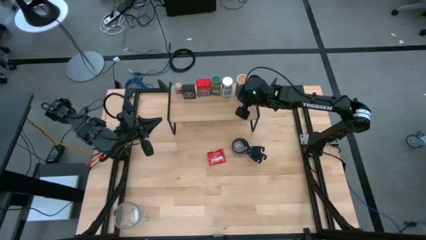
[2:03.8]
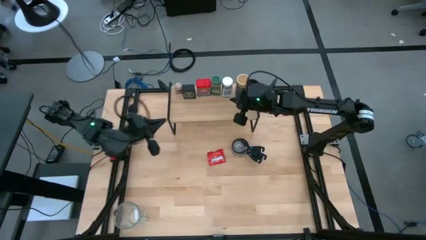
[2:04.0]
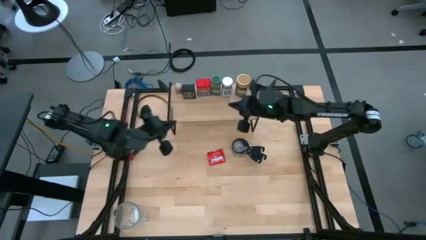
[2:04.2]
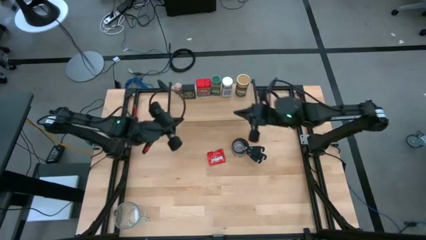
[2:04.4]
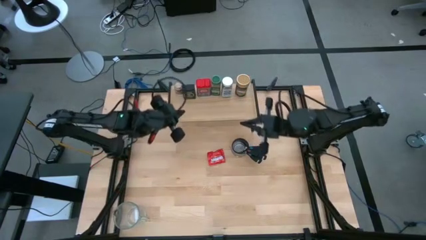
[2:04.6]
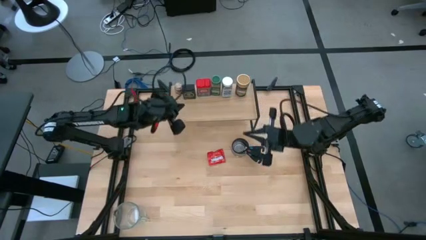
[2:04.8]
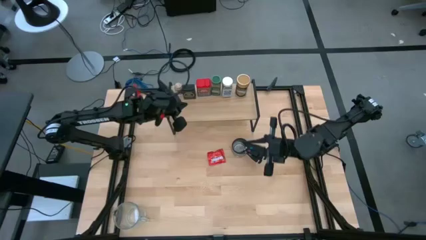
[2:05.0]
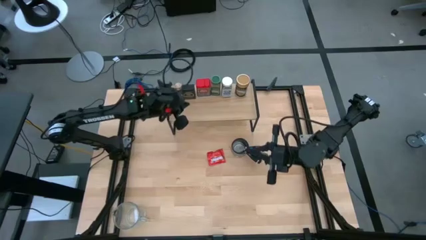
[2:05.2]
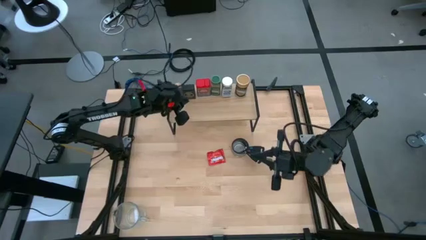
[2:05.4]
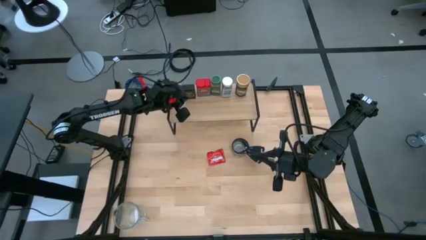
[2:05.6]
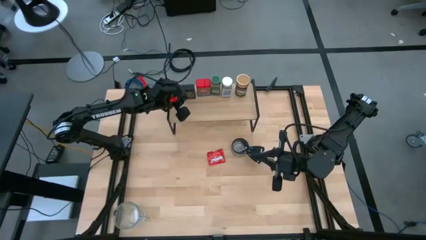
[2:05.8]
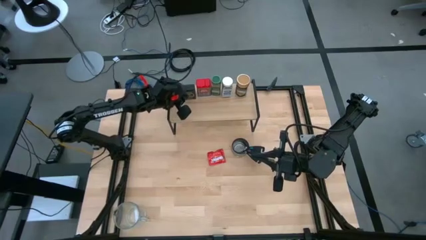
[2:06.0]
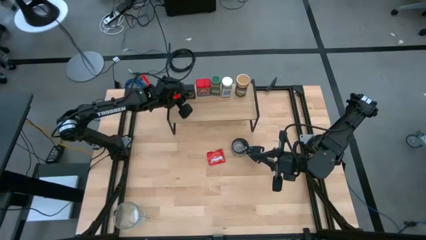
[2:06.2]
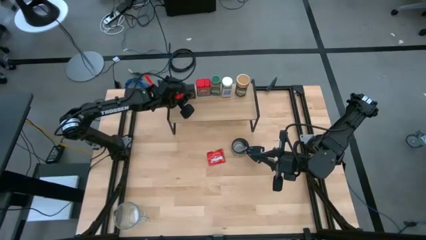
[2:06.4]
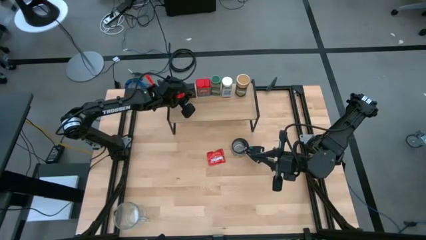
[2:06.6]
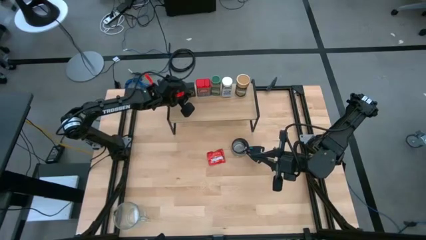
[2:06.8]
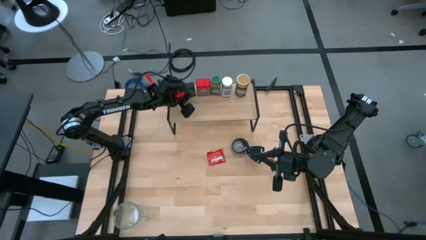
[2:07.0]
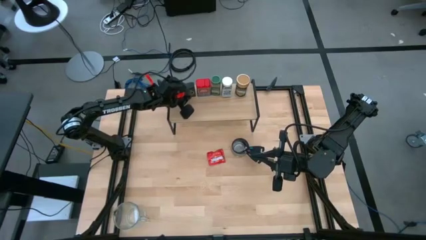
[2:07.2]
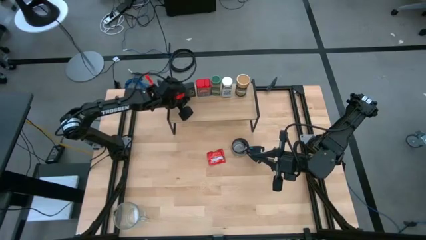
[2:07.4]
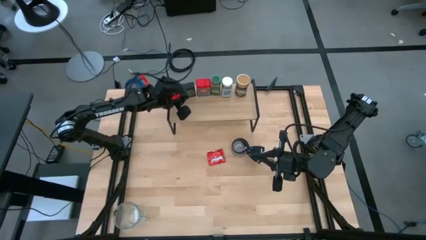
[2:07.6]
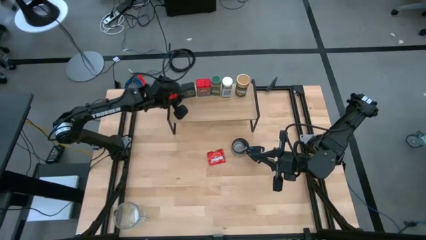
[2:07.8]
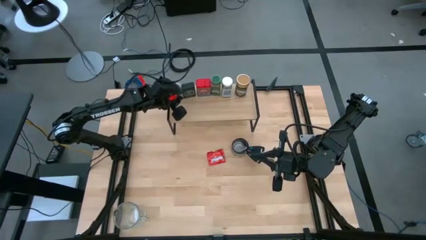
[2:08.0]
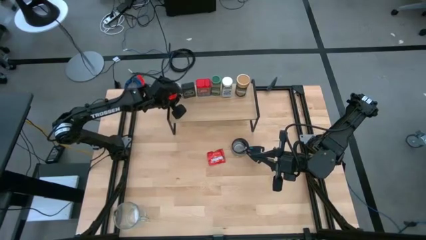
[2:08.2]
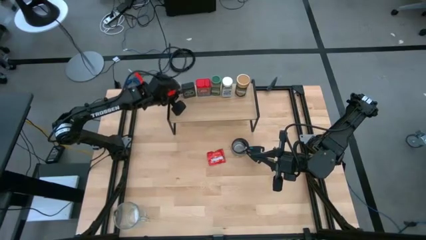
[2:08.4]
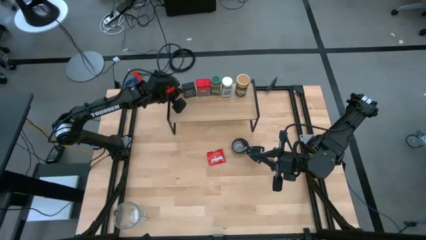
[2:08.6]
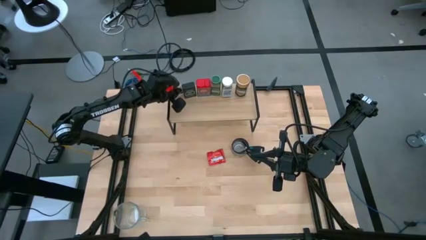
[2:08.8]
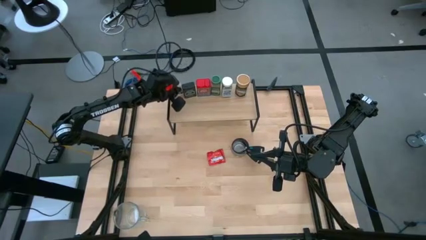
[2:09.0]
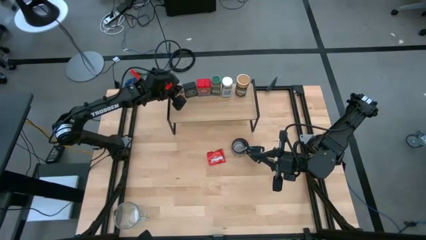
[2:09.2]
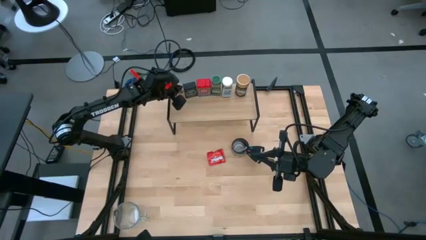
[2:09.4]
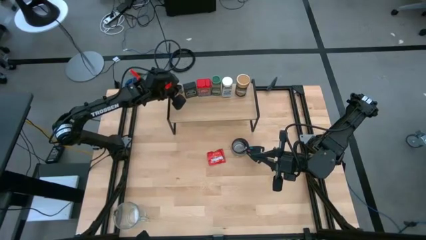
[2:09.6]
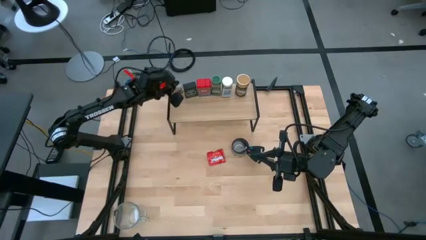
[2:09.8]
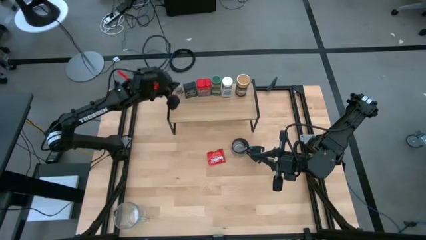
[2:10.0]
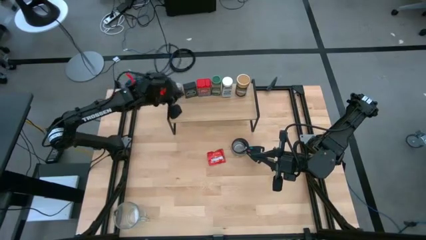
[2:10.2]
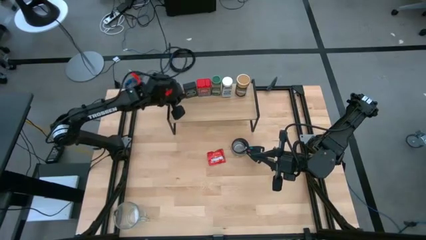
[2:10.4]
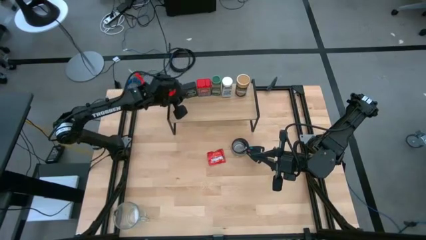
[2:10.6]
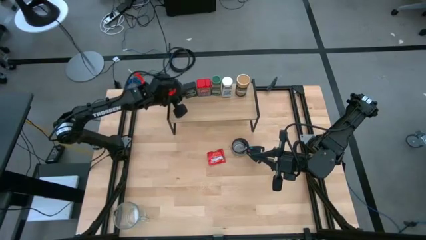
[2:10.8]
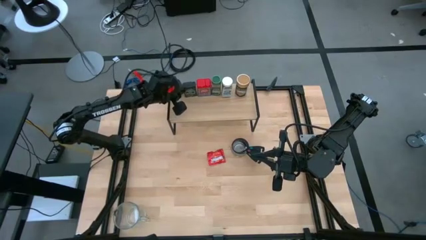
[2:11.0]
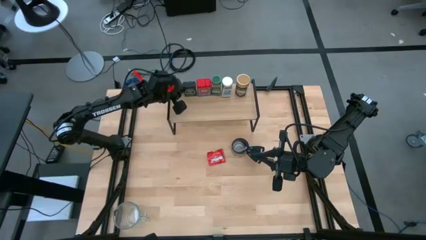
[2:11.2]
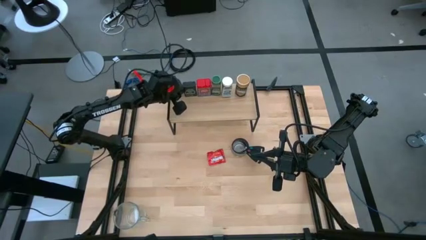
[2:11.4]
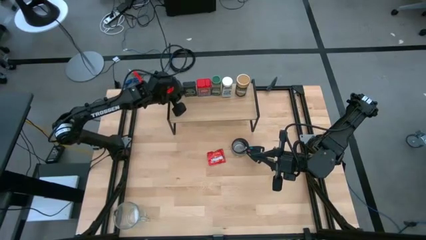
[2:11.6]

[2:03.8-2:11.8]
Task: Shelf spices
Adjust the black seasoning can on the shelf

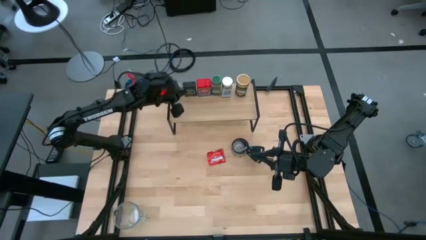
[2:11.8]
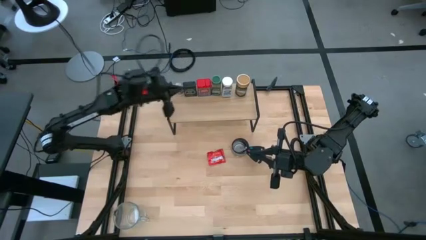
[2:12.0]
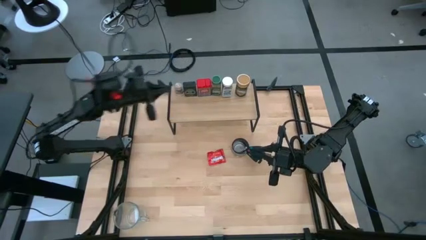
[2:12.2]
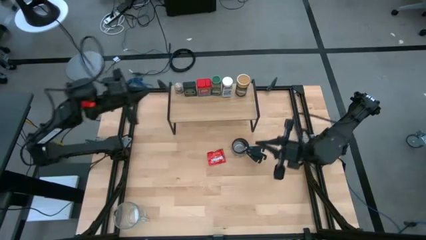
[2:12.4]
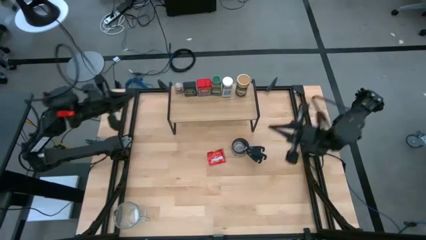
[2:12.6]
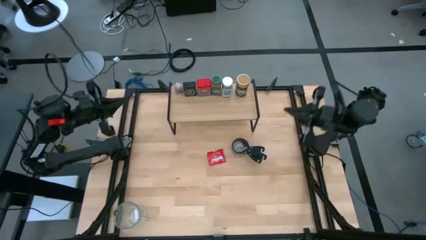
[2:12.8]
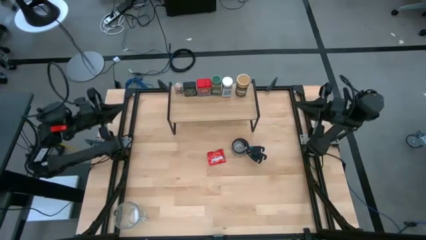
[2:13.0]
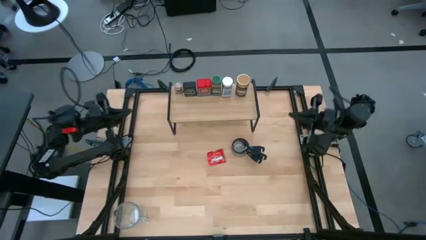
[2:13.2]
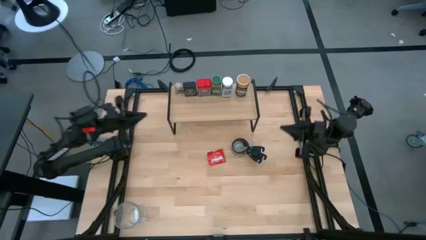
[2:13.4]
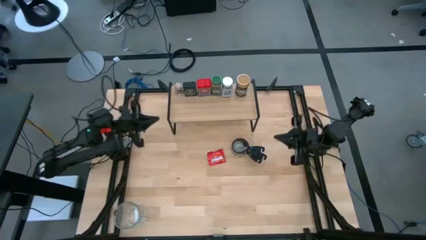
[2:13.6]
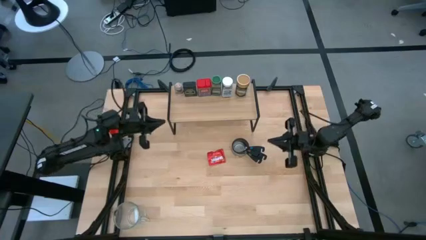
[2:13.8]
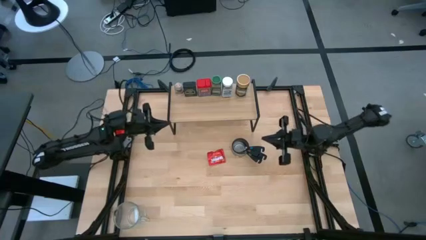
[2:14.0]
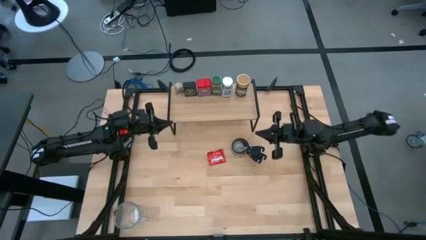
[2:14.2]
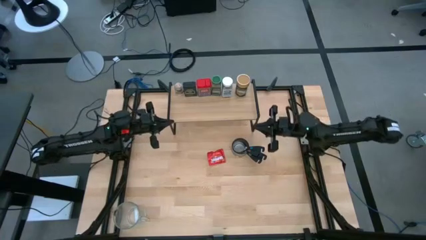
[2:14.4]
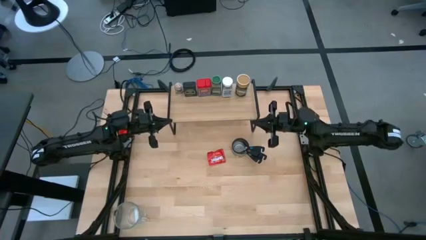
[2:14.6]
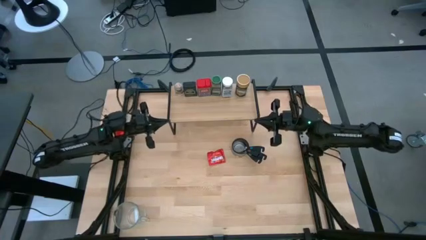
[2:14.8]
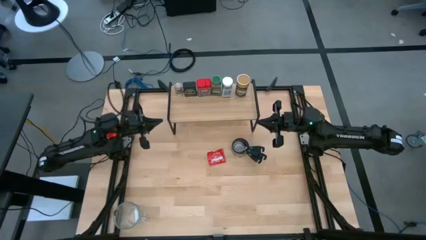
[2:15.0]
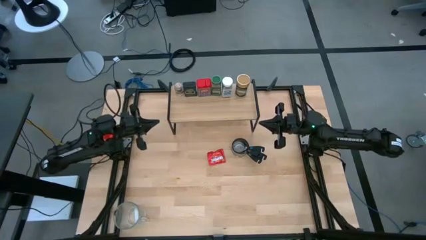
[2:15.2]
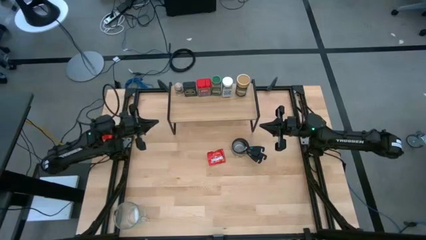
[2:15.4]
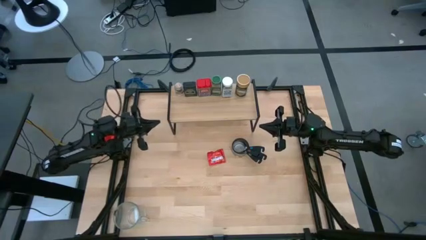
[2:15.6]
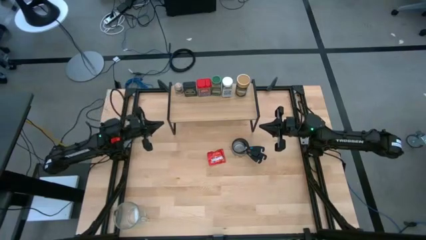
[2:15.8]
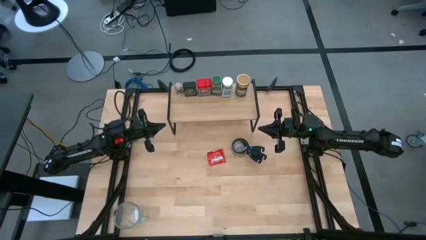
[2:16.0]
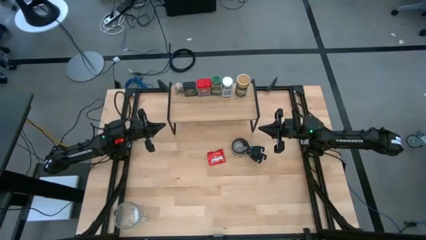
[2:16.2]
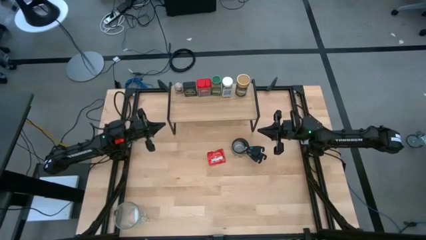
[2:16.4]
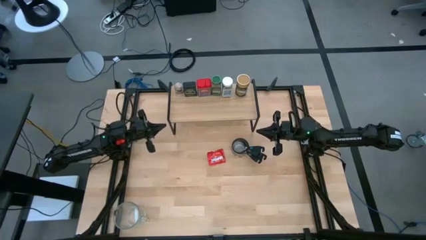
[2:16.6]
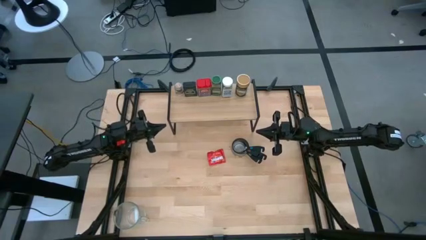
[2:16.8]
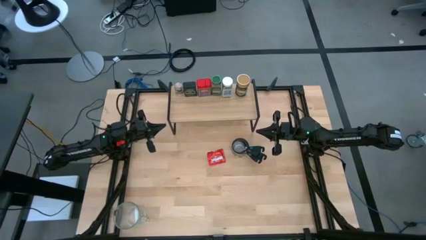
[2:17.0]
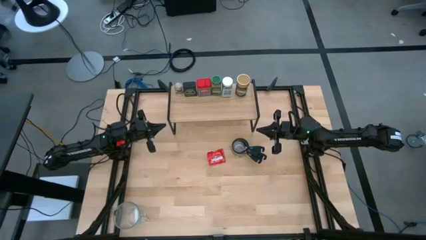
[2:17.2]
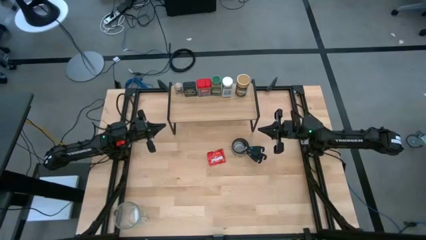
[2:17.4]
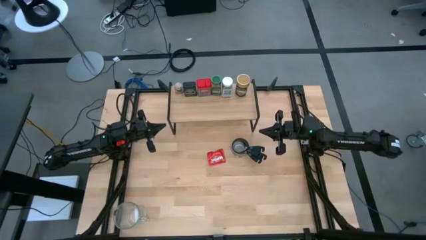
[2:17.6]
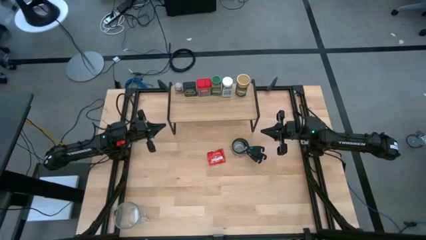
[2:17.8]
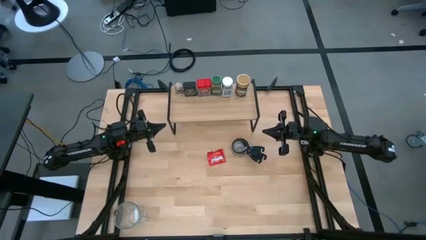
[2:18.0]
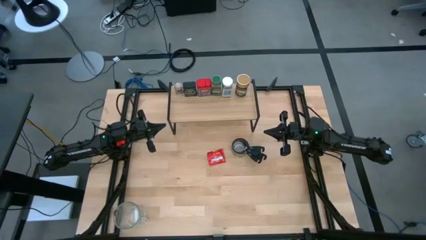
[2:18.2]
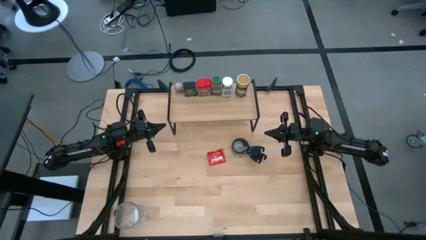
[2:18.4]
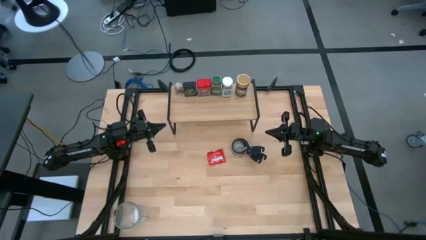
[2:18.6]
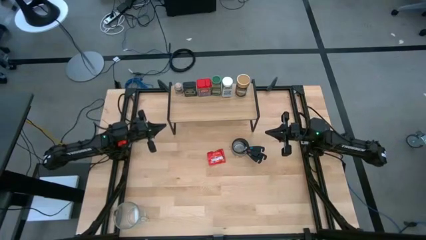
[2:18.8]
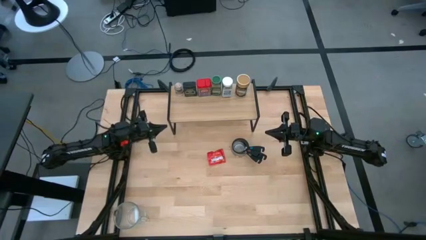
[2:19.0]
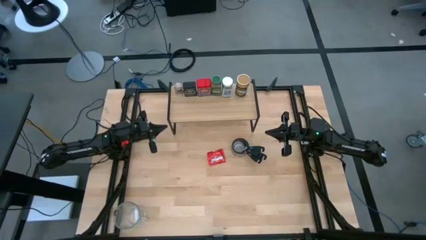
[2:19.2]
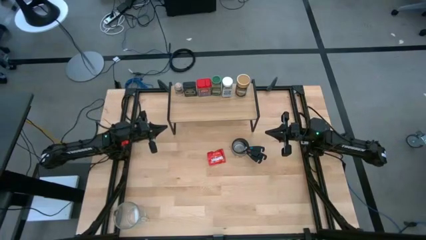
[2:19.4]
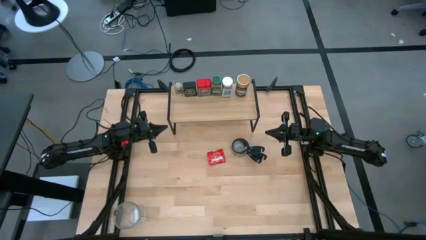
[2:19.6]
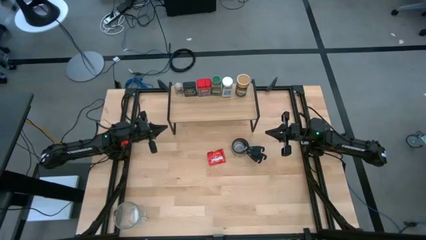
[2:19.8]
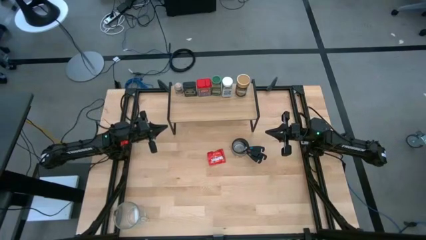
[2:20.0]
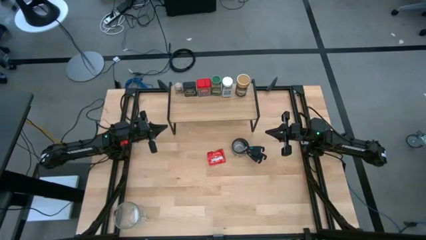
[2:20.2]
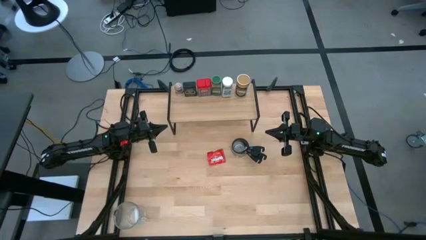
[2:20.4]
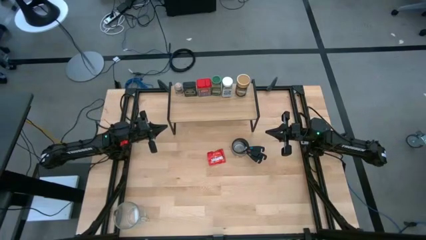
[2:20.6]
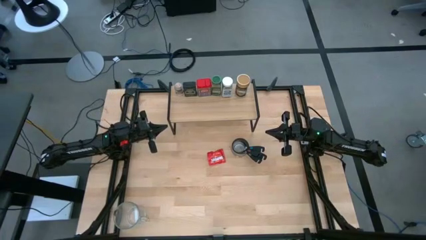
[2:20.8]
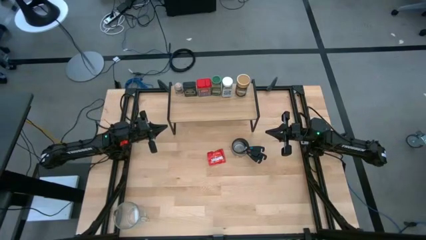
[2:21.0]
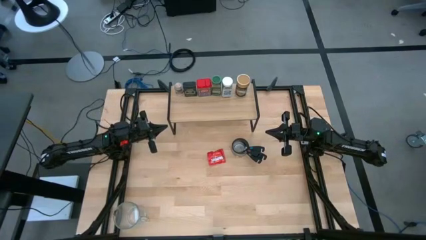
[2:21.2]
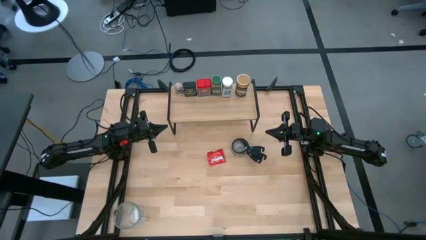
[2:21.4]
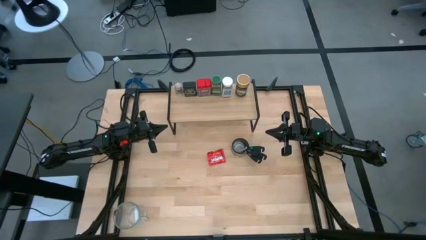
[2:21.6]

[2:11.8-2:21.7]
Return to Home Position
